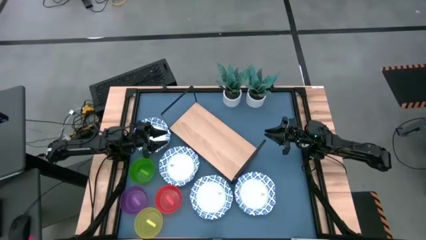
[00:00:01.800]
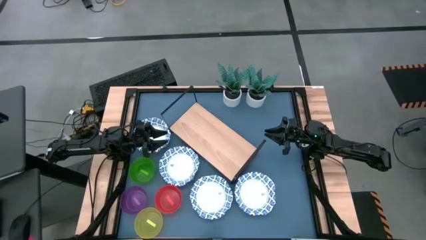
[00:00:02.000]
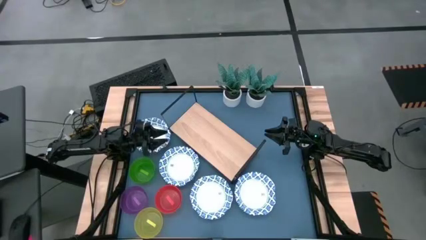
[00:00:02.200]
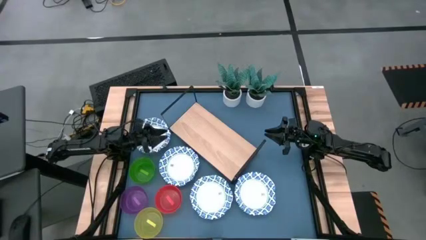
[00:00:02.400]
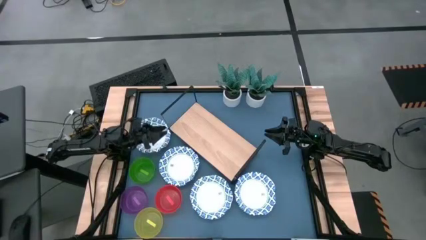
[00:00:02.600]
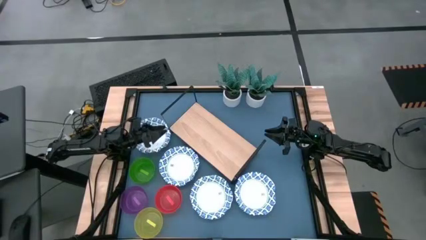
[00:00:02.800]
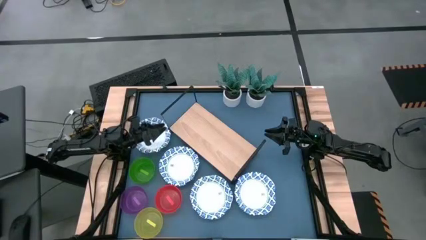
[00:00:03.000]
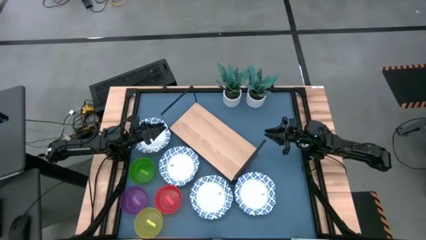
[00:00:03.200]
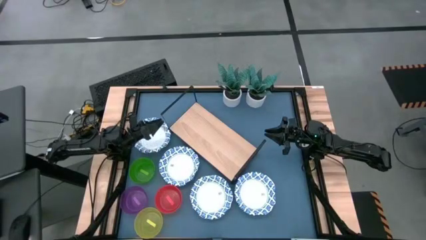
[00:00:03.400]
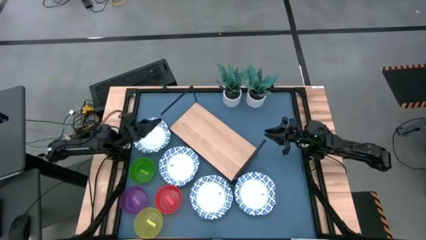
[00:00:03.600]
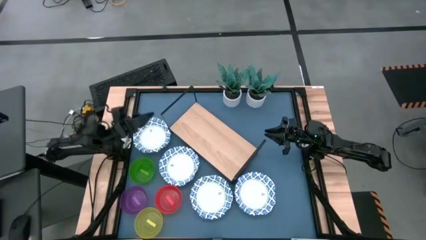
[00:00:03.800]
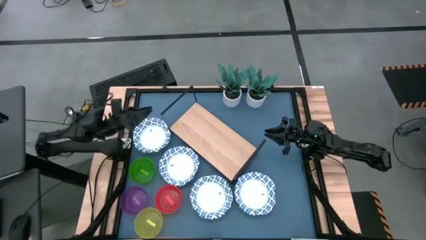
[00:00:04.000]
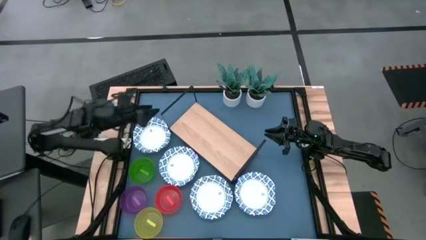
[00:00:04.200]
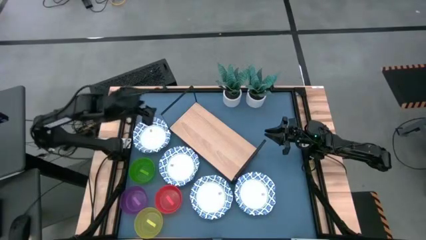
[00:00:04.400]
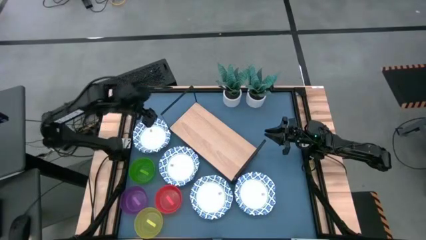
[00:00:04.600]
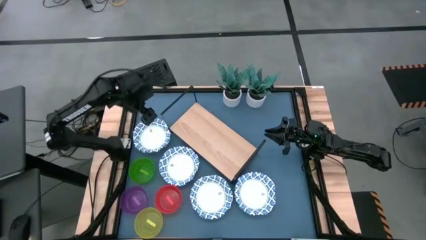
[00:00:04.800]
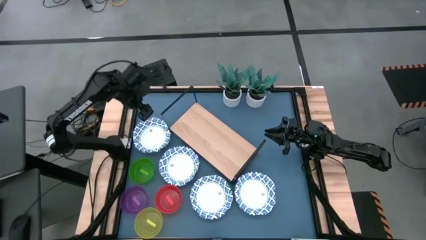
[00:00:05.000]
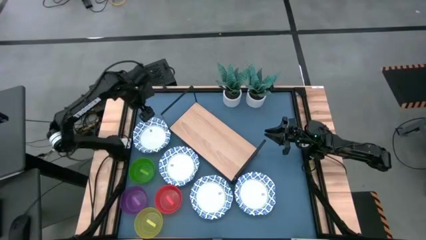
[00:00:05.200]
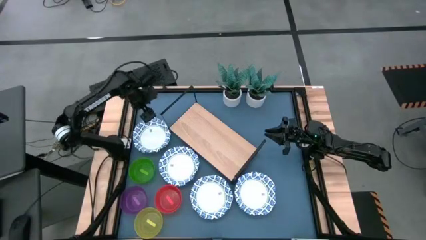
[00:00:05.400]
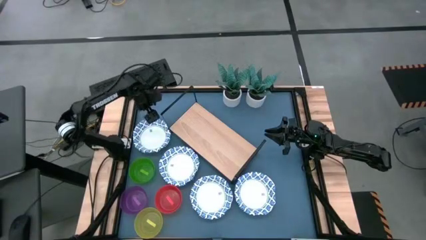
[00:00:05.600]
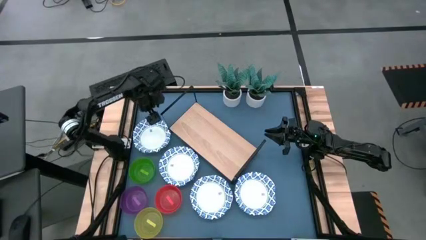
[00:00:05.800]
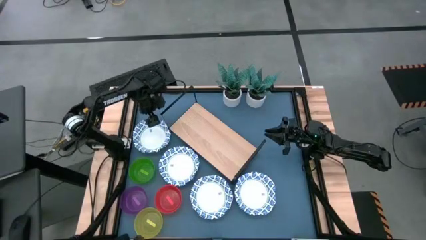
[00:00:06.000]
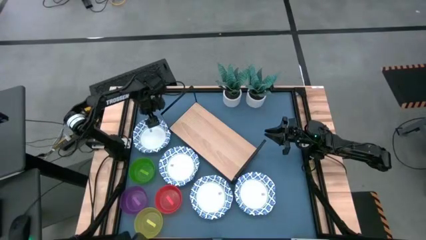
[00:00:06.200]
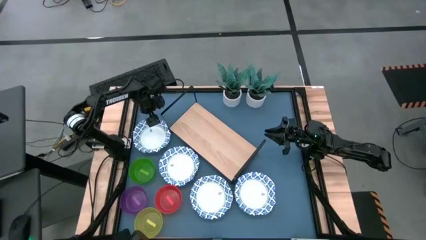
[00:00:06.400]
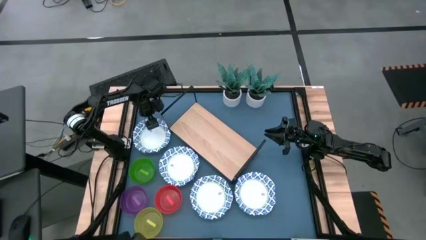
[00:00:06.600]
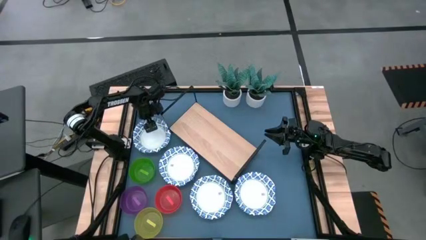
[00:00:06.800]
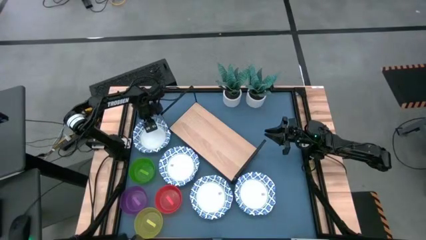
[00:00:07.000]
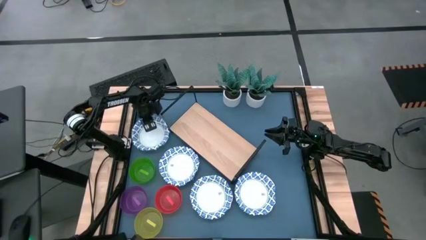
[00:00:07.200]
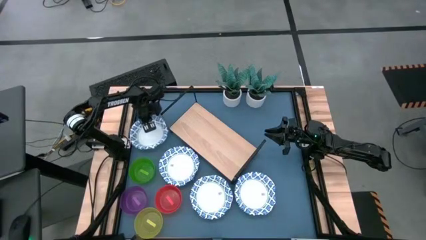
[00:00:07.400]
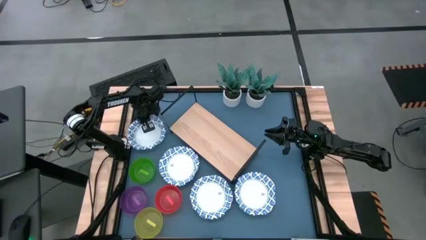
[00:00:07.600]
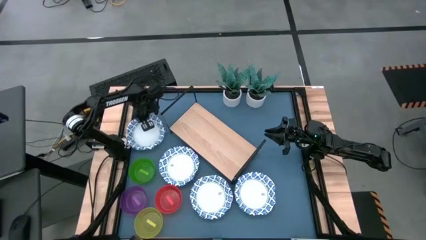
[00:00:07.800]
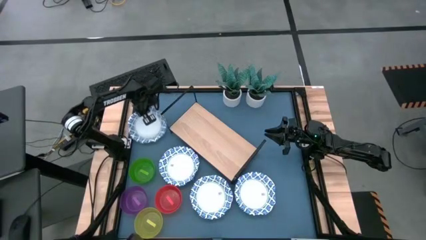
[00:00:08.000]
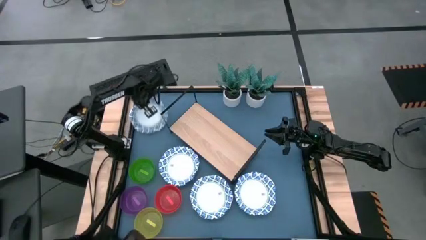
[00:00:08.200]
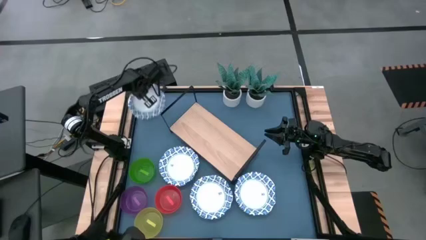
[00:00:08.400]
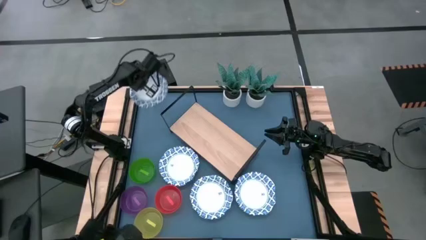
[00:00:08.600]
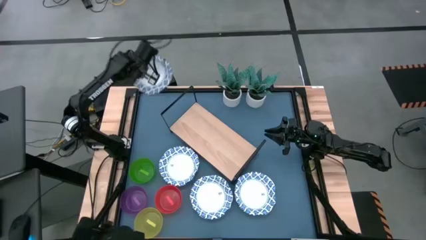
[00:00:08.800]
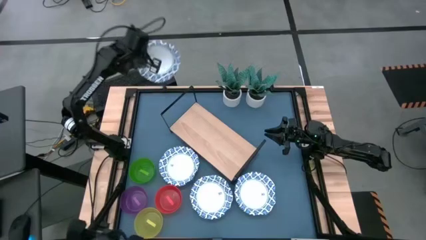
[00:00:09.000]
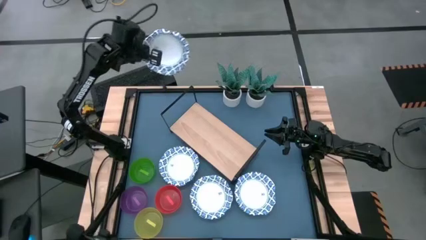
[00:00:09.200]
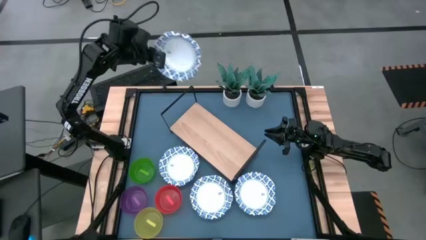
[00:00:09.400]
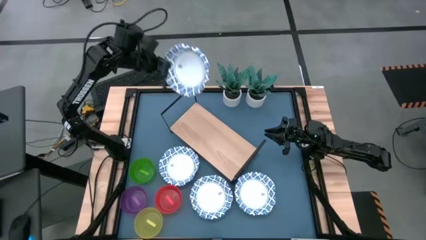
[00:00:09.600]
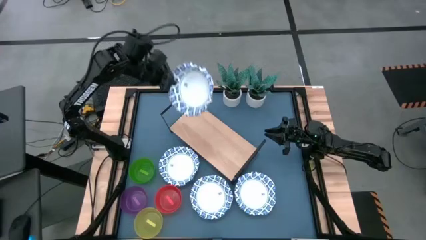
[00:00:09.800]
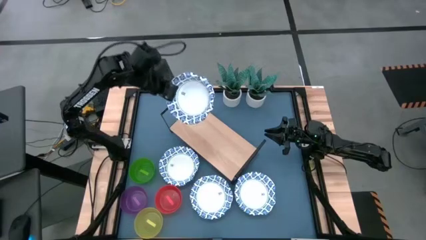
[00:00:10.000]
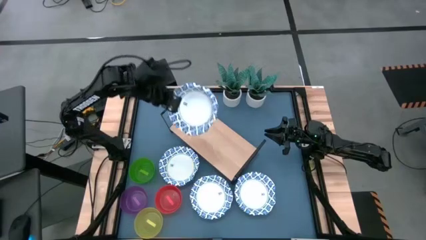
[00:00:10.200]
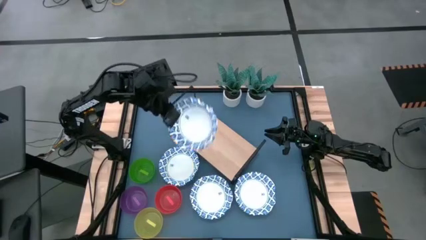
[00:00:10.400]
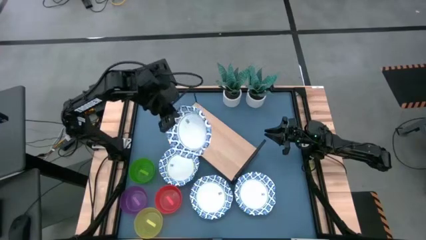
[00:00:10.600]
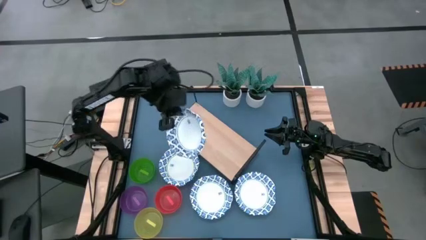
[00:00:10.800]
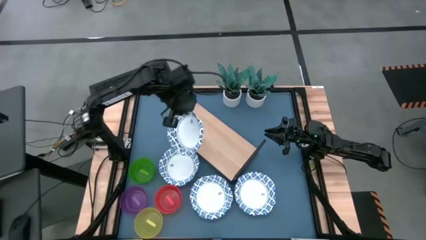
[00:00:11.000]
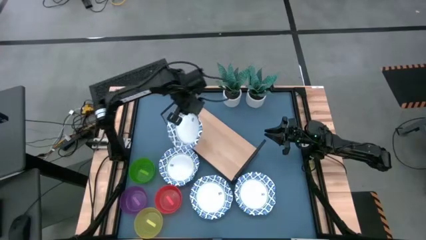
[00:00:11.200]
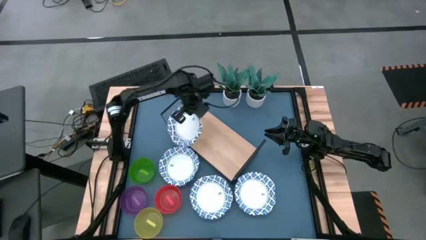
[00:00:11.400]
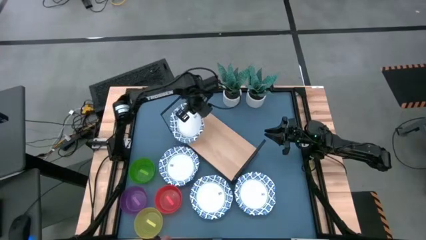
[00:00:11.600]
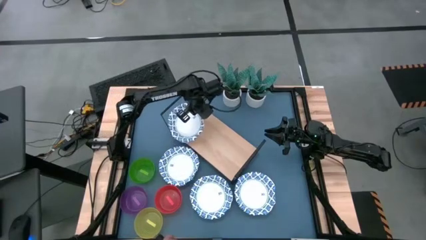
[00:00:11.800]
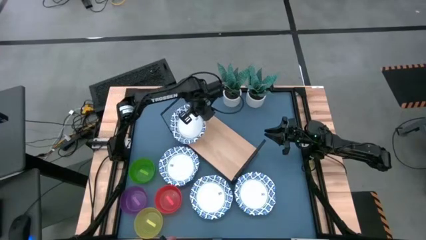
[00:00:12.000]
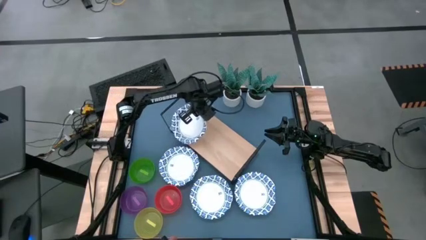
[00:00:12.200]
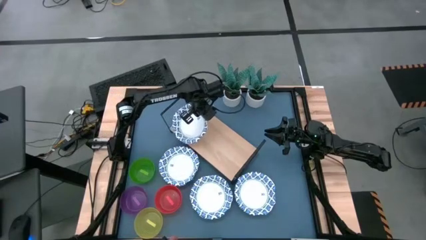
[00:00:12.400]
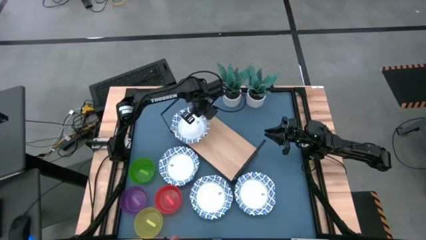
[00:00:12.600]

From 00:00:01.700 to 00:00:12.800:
Task: Place and stack bowls onto a shelf
Put the left blue bowl on the shelf
